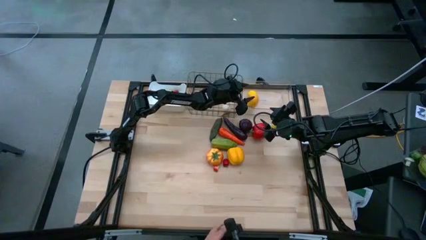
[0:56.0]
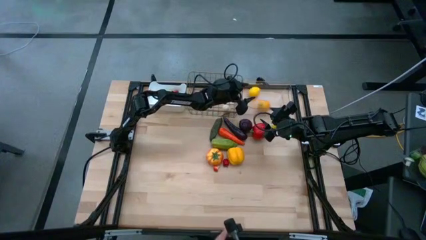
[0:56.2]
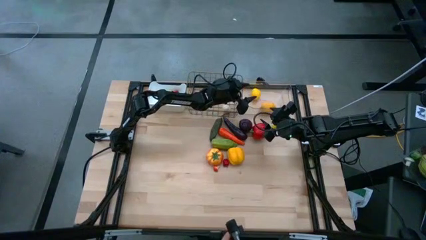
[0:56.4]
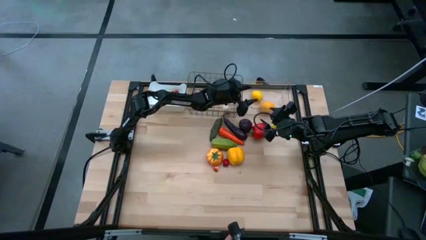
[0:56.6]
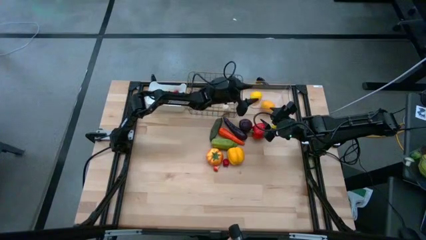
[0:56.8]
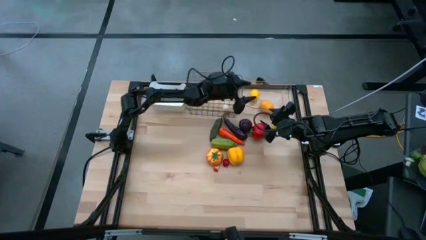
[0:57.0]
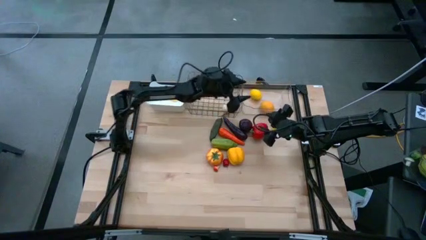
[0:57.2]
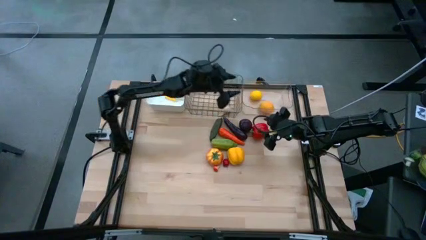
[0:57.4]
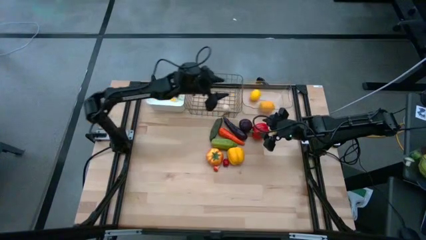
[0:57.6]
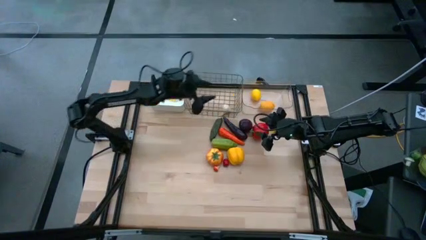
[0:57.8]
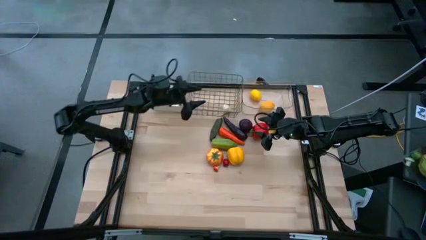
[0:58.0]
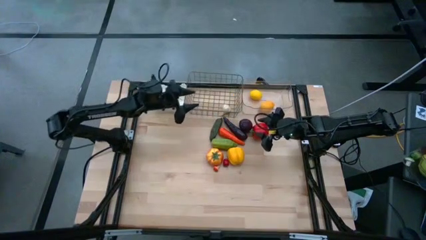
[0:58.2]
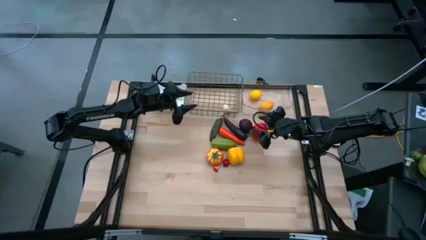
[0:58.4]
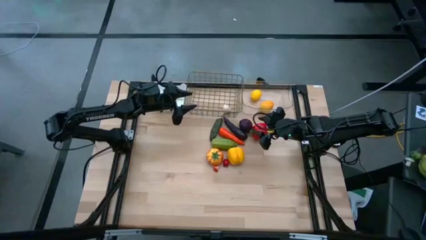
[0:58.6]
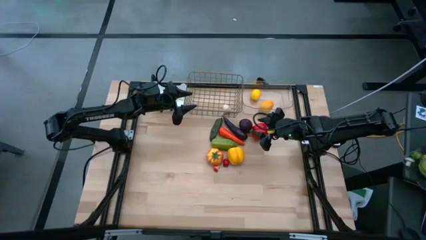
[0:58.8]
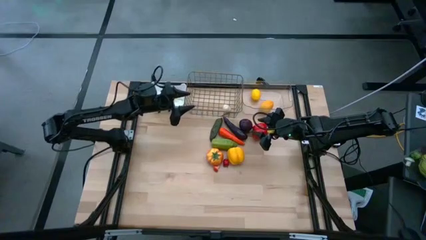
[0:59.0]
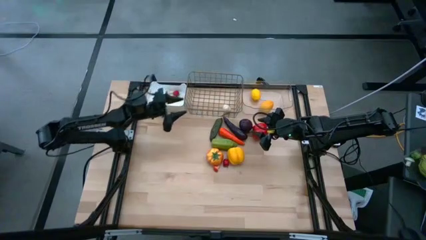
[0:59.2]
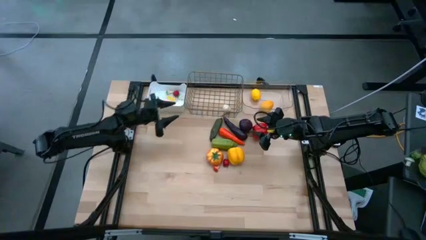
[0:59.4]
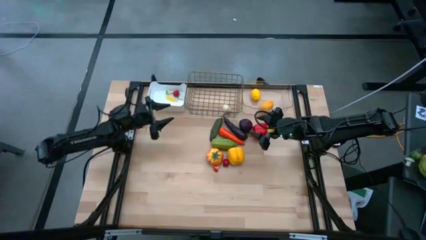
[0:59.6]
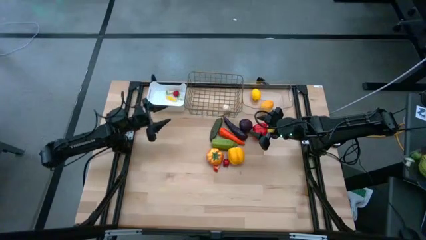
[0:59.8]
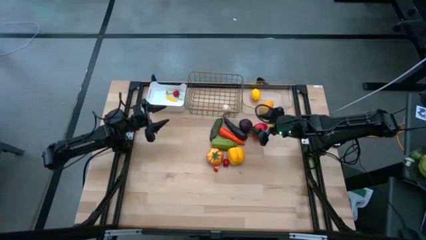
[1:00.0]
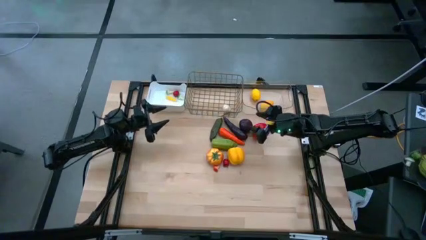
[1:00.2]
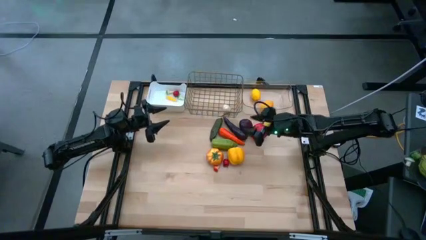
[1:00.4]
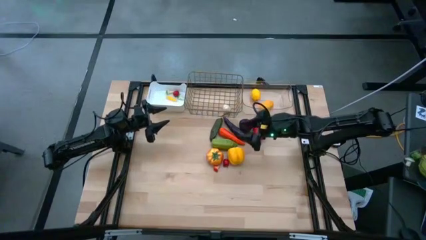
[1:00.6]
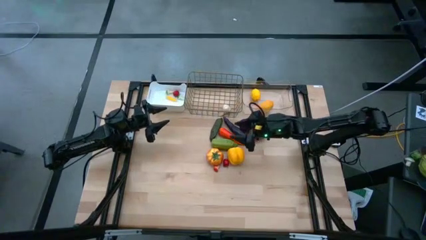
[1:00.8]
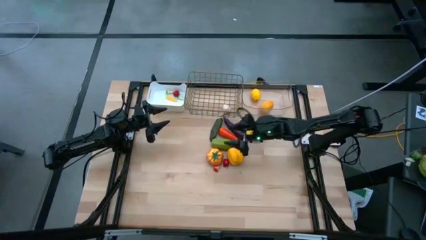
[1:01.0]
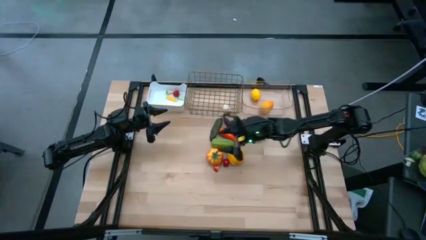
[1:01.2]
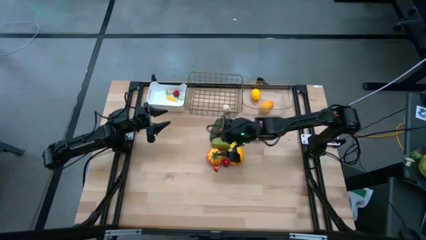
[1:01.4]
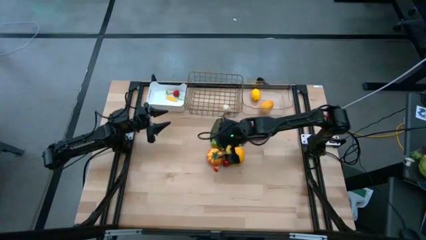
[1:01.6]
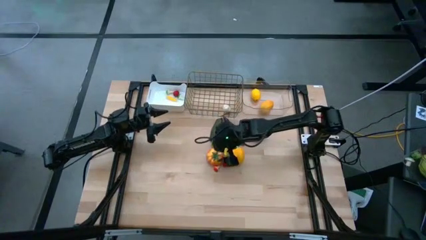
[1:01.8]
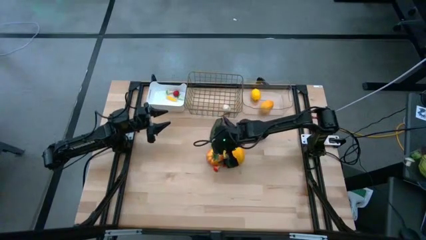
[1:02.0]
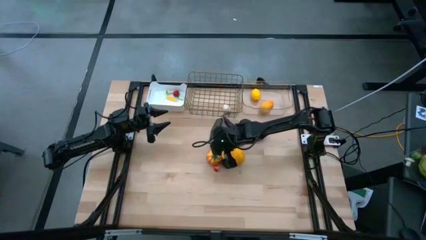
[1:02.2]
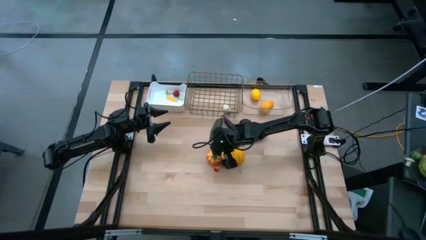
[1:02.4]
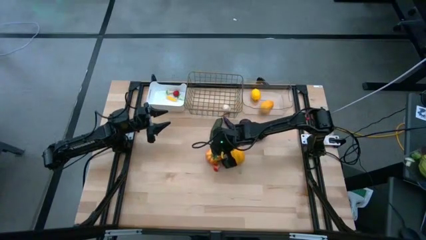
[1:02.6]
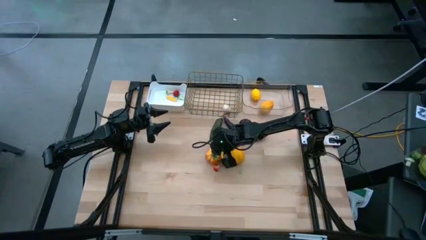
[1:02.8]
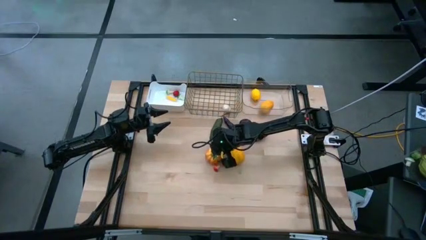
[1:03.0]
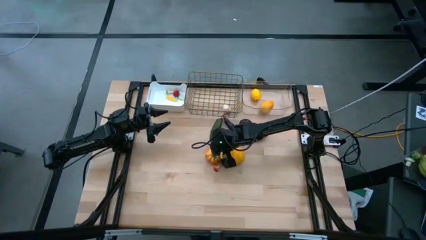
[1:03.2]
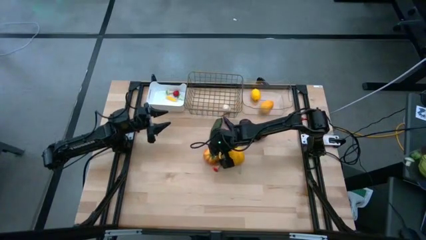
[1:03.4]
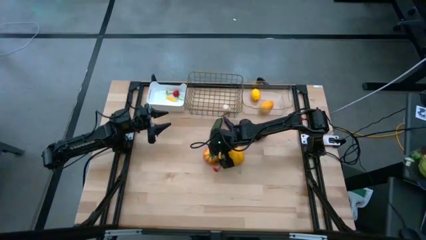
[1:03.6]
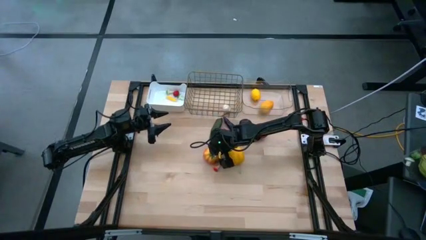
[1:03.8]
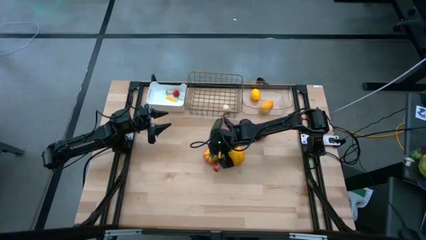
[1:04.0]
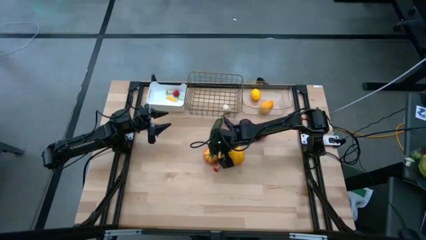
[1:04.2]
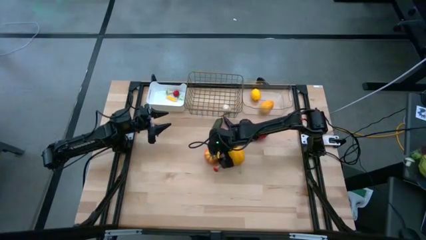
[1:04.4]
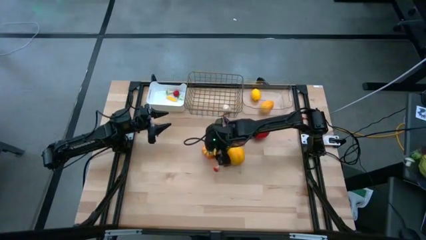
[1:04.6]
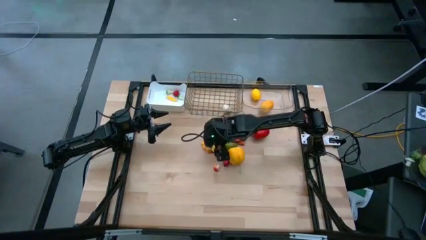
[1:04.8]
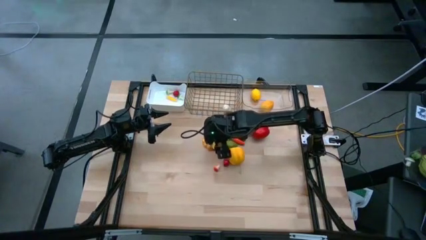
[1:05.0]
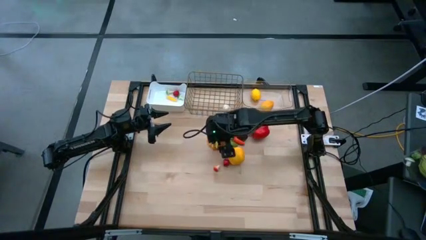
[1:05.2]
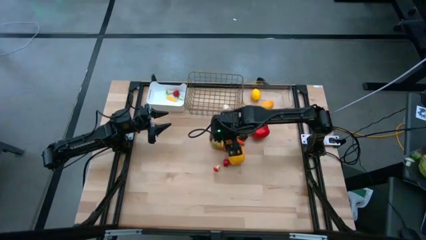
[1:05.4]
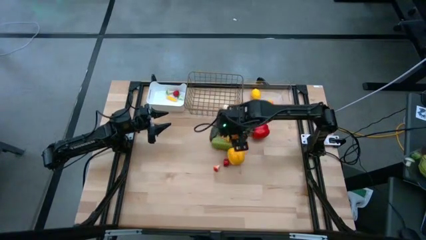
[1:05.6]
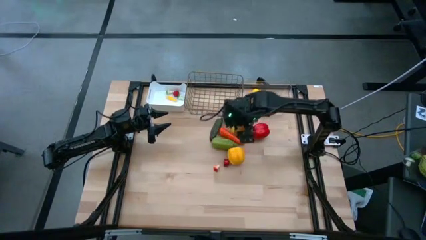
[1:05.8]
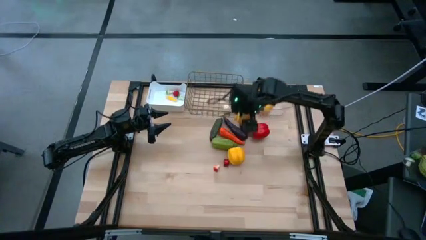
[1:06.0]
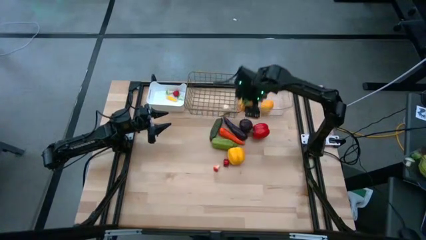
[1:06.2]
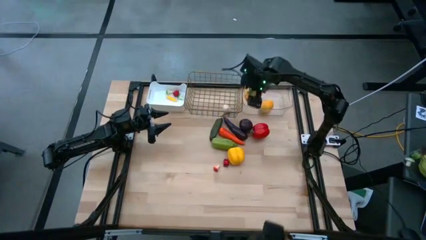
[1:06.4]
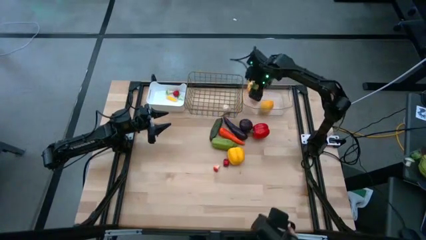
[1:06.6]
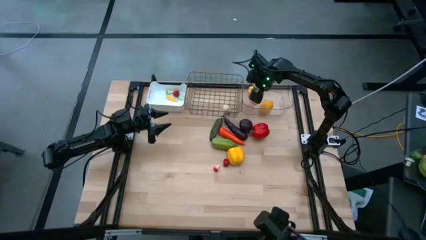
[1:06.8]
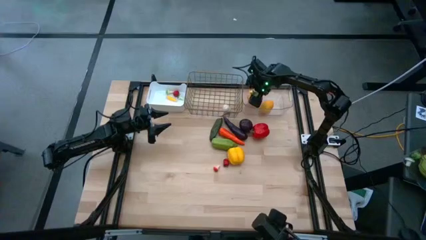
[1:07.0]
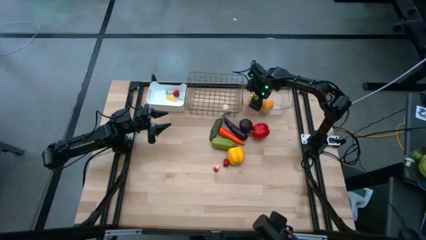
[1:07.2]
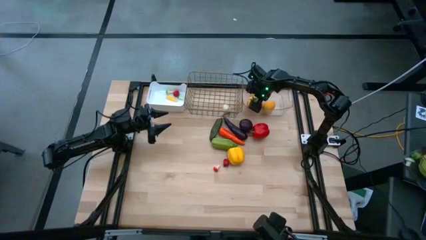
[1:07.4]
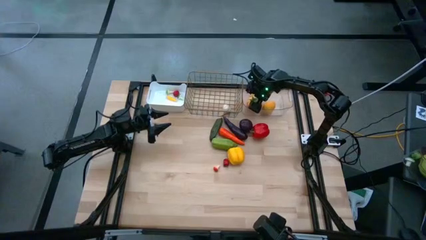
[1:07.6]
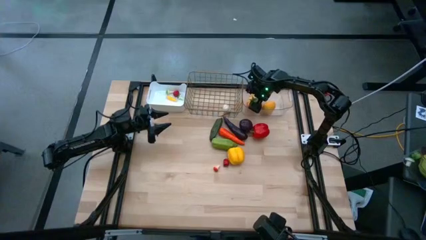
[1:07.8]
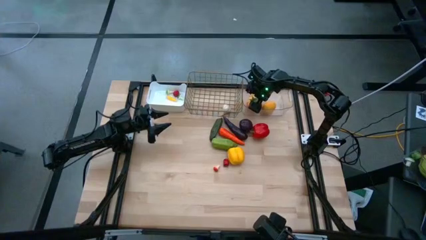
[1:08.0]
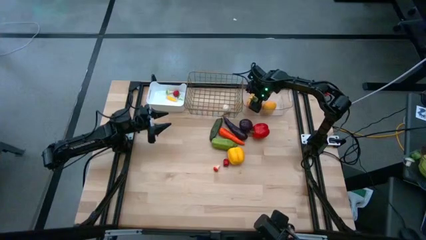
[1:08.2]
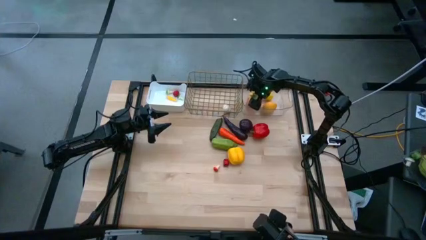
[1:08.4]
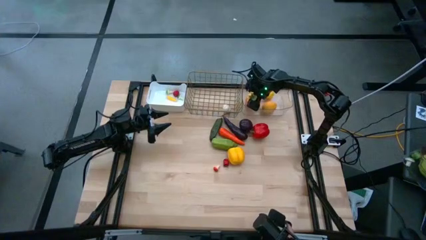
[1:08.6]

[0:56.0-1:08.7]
Task: Sort produce into baskets
Put the yellow tomato into the transparent bin
